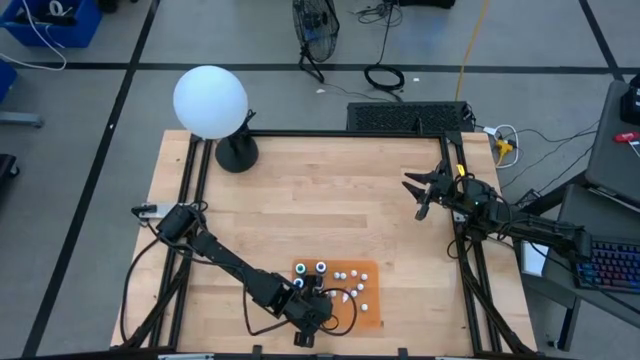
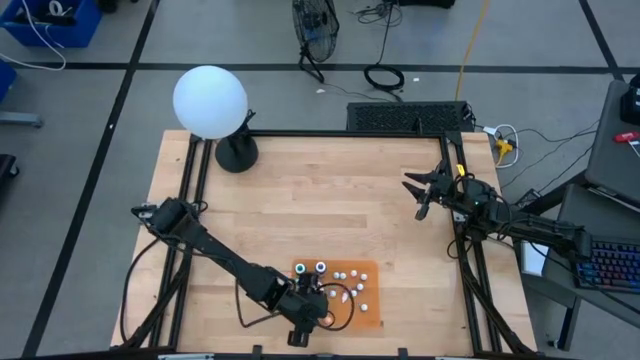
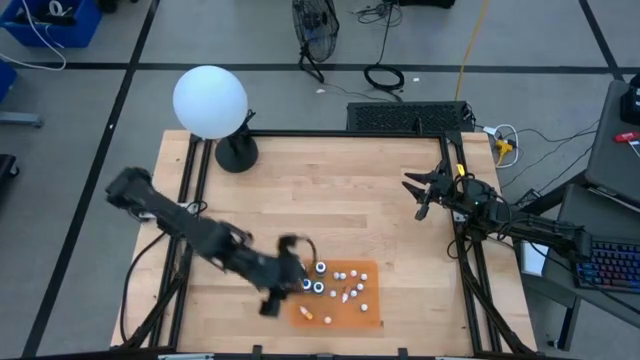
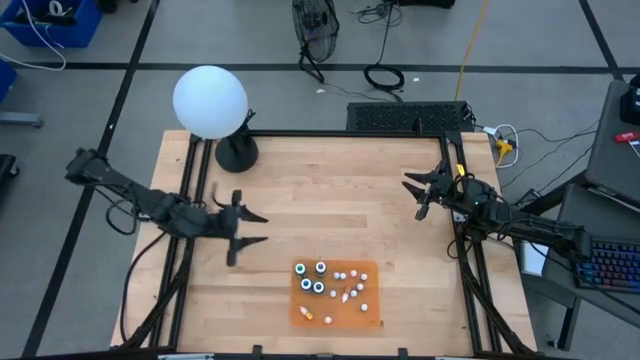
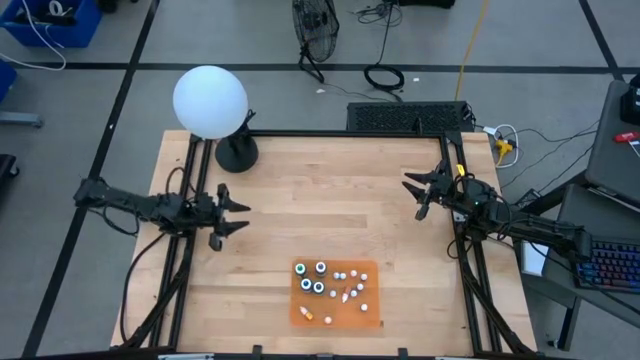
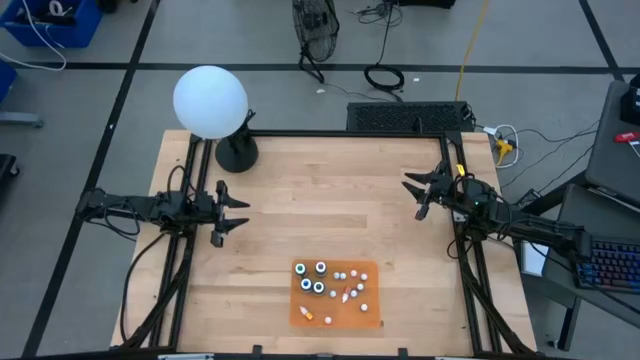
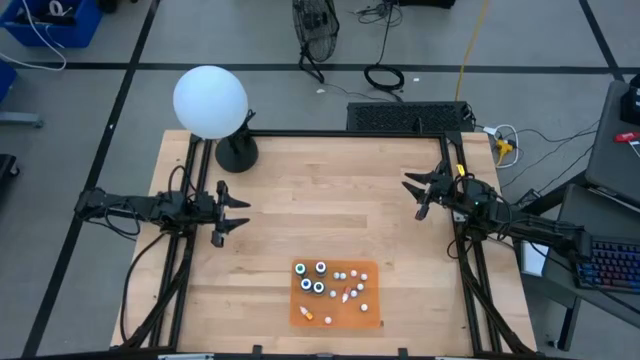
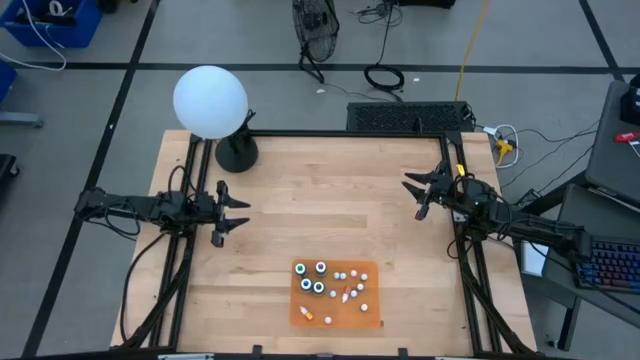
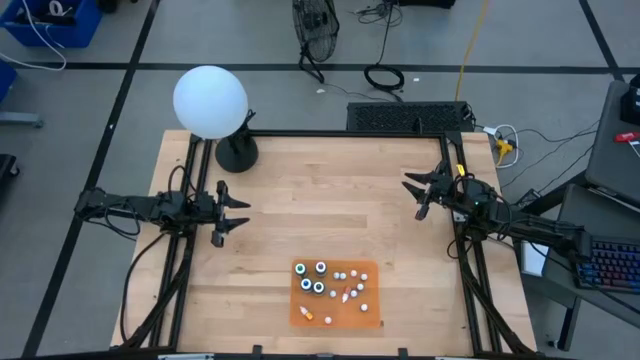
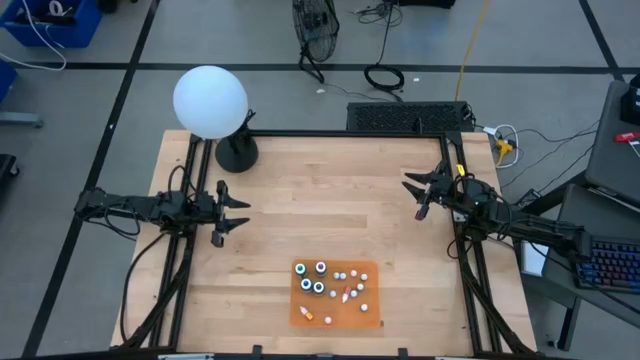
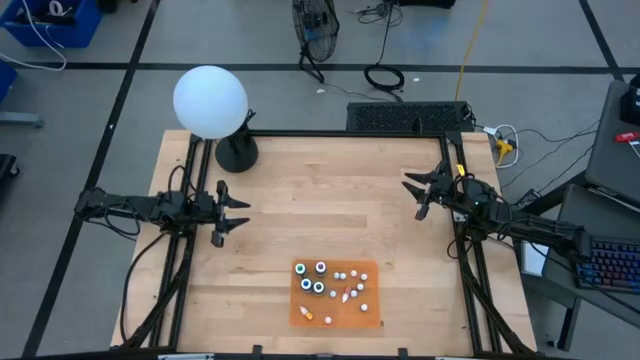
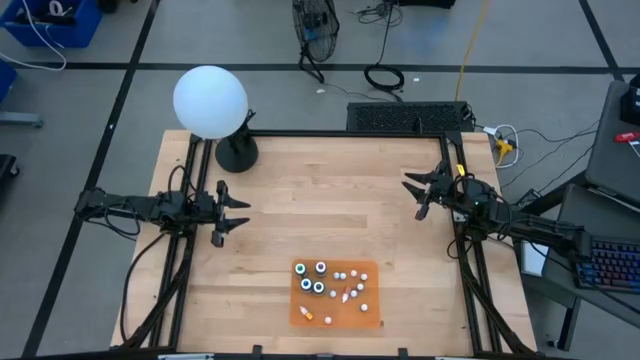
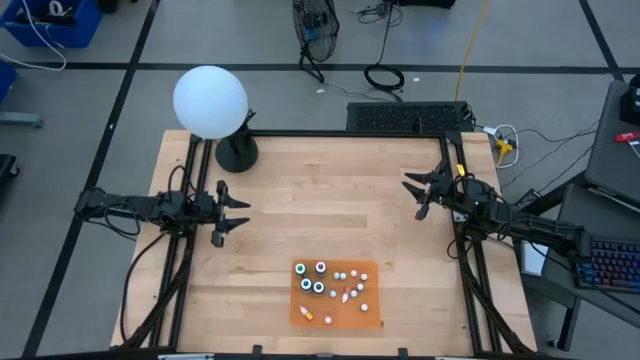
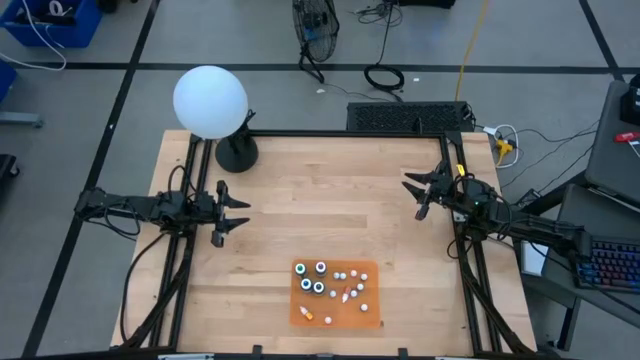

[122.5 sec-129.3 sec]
Task: Pick & Place food coloring
Return to Home Position

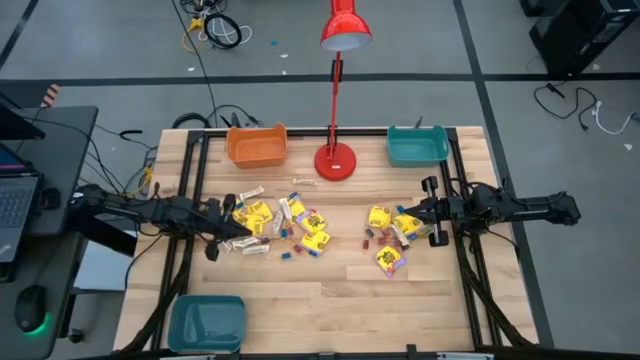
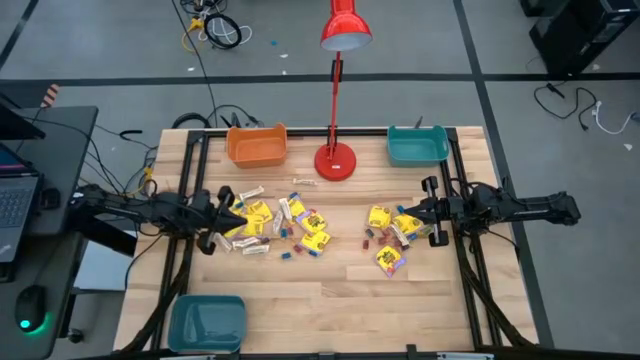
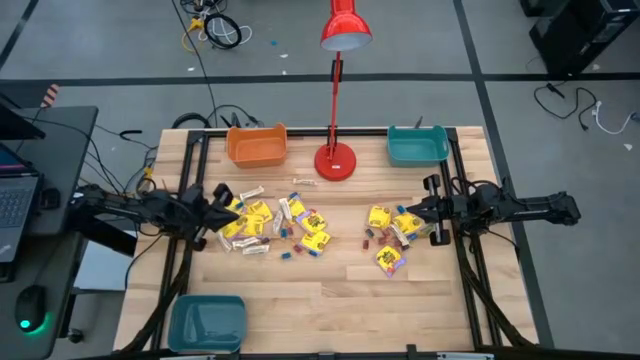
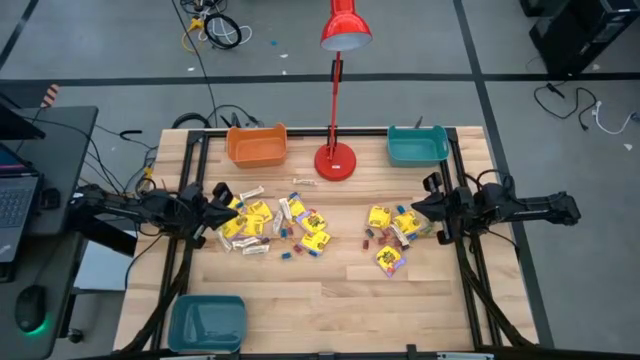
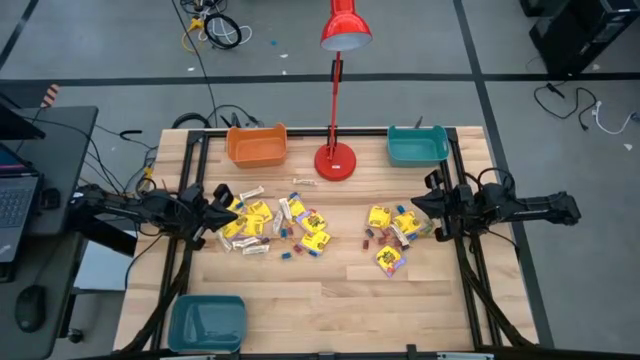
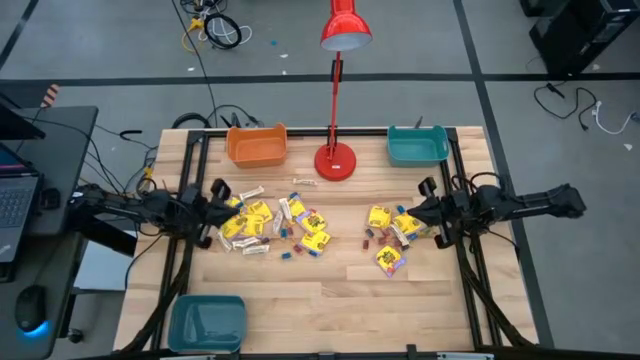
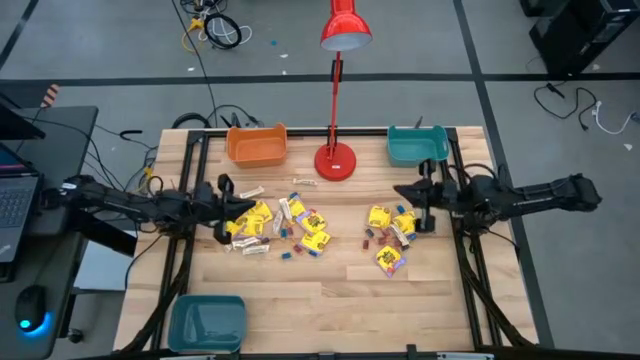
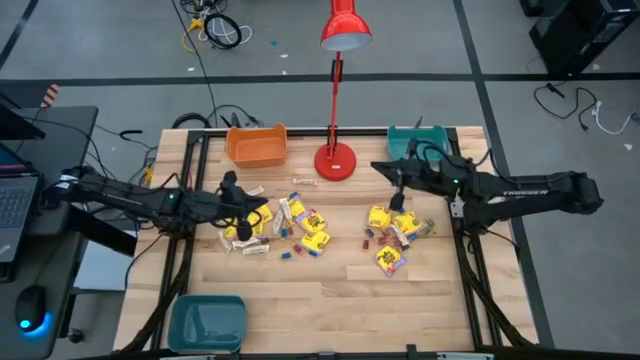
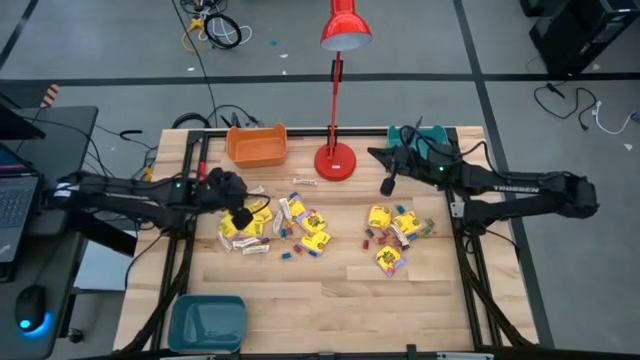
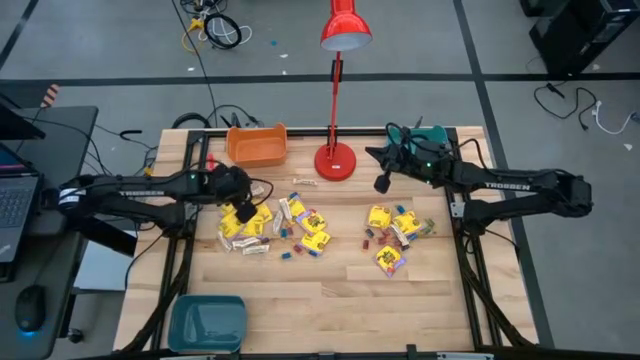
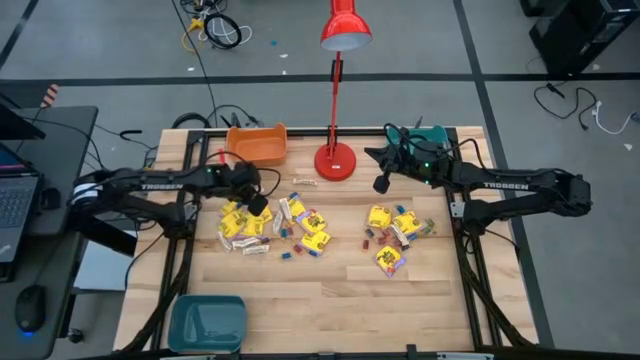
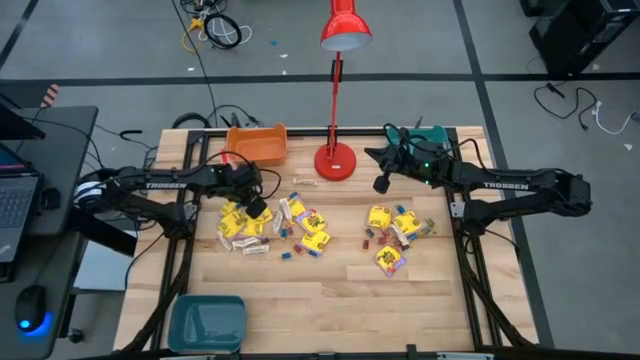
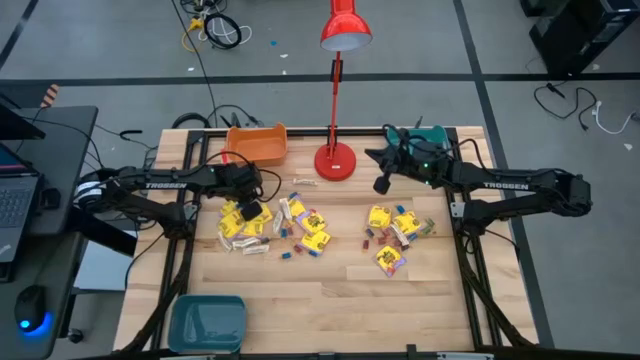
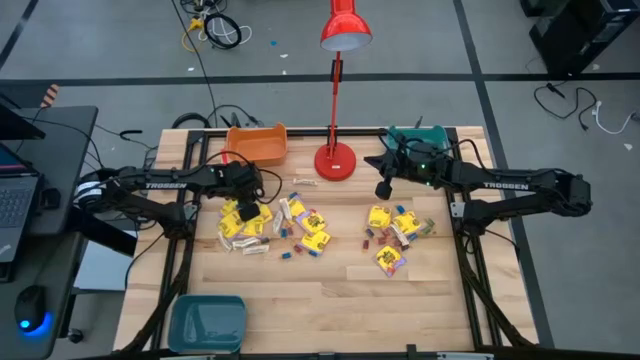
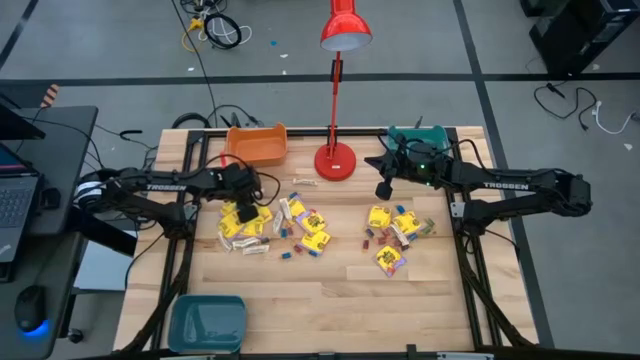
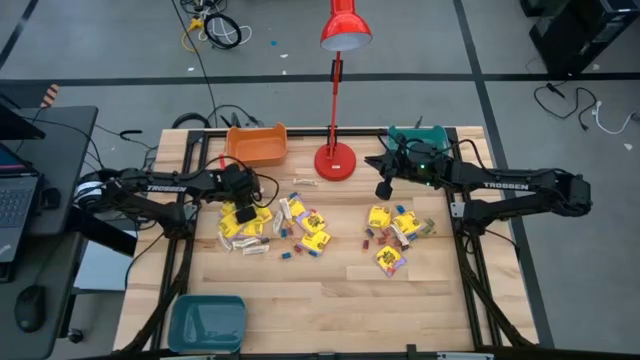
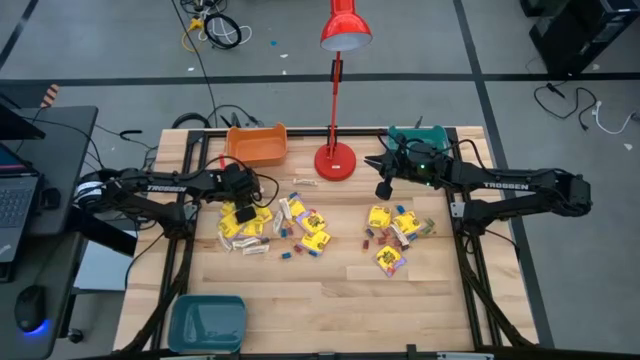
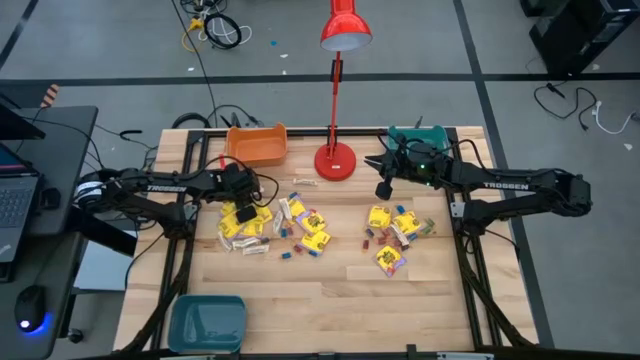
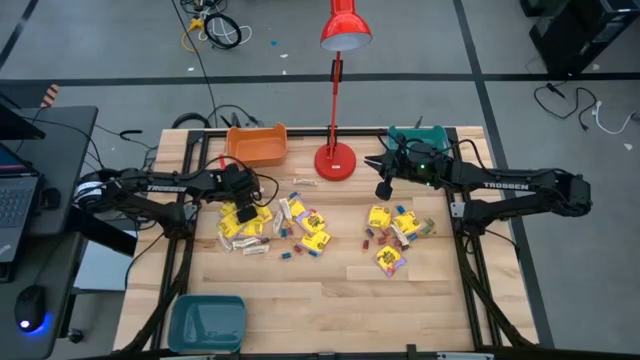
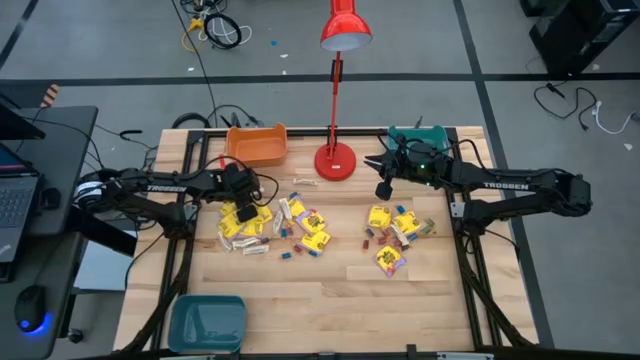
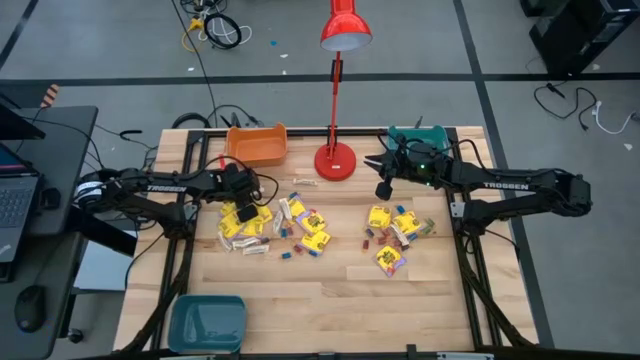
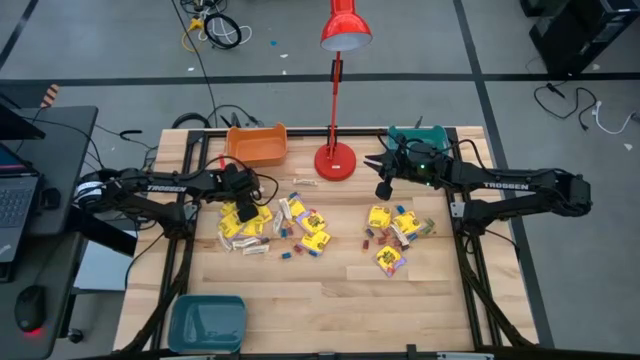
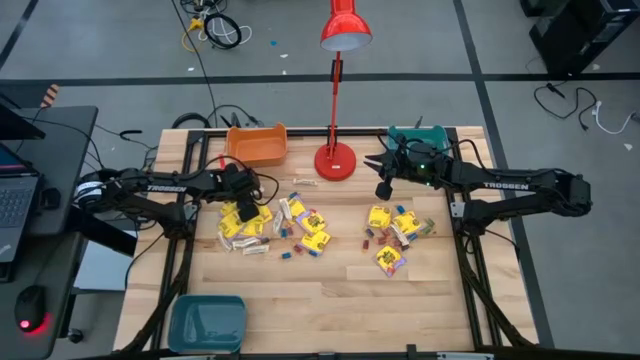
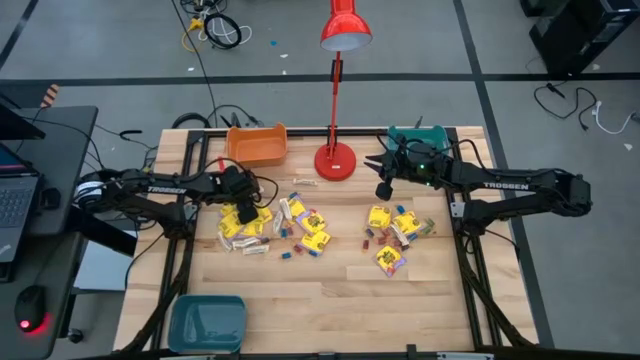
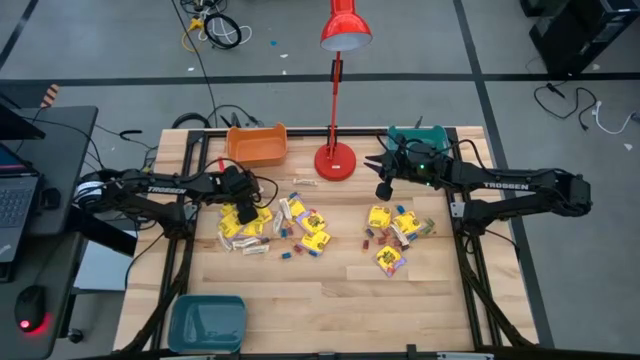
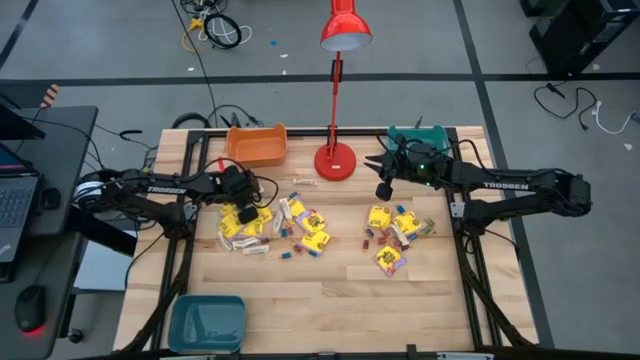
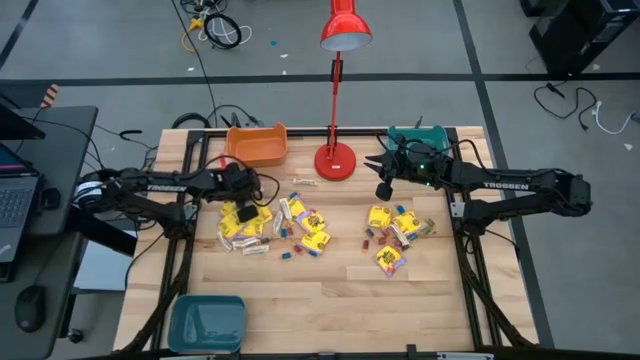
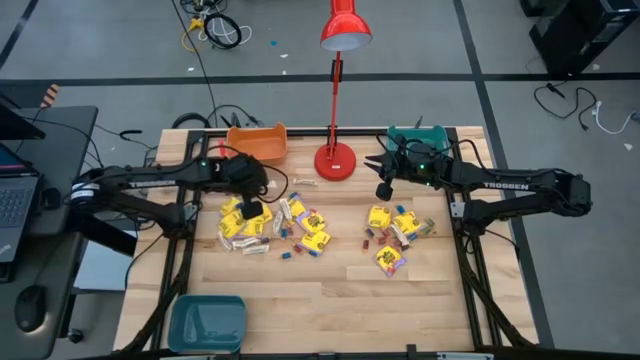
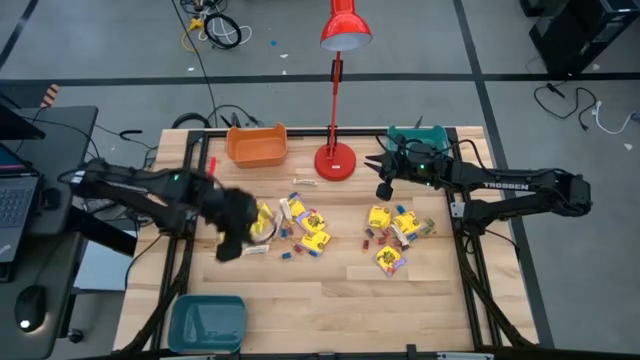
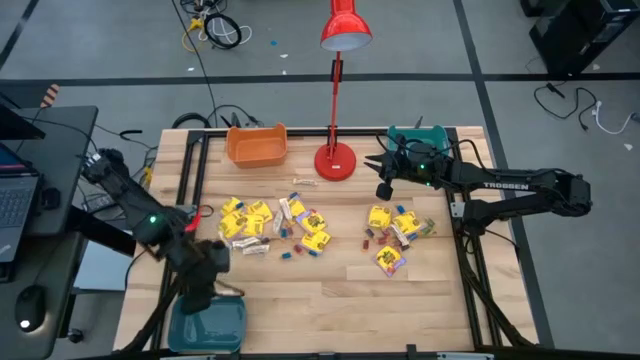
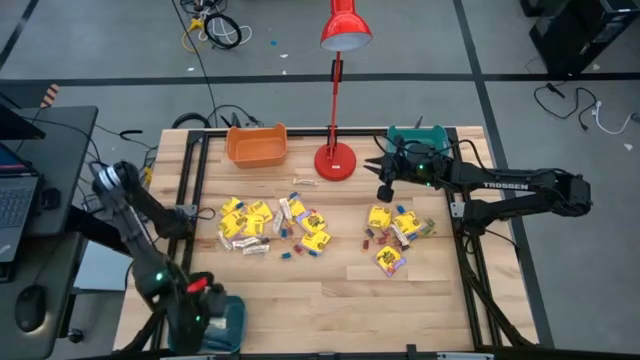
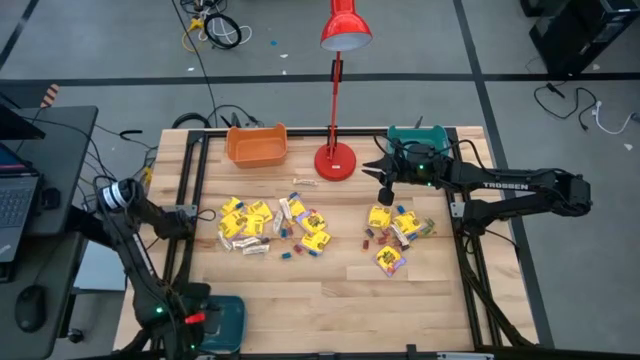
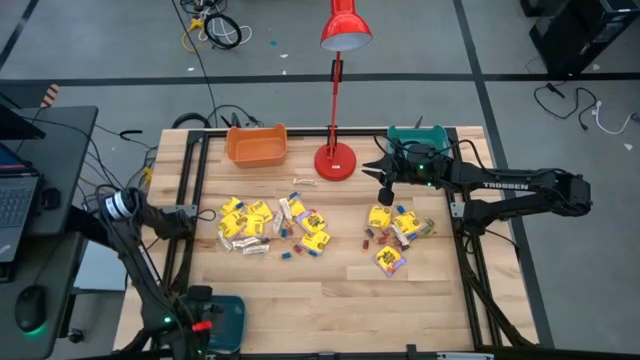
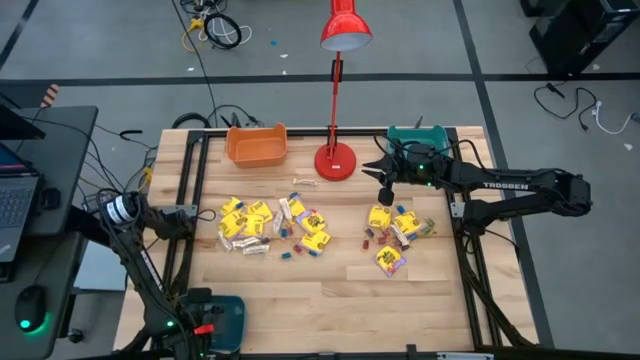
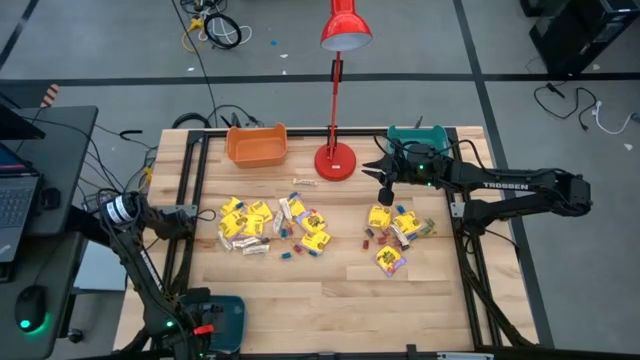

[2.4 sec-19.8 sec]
Task: Sort candy
Put the white candy into the blue bin
